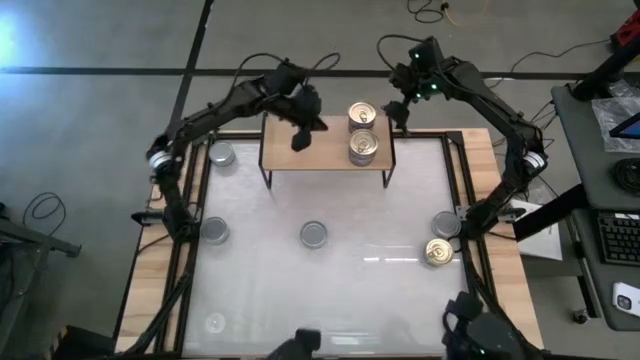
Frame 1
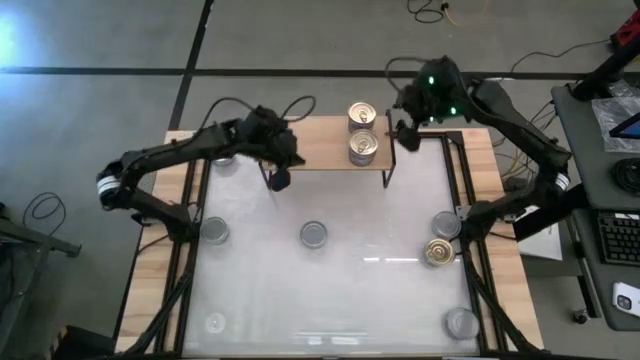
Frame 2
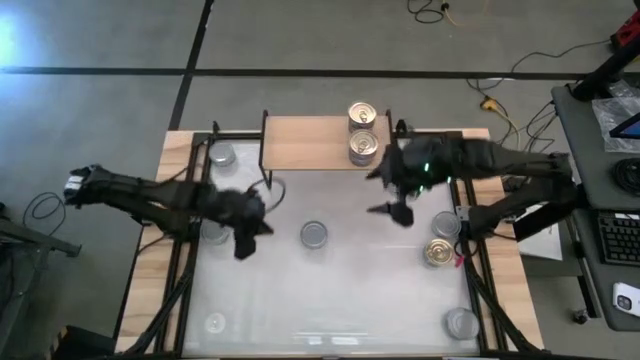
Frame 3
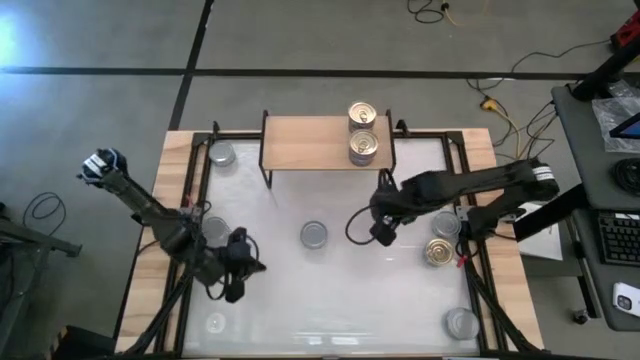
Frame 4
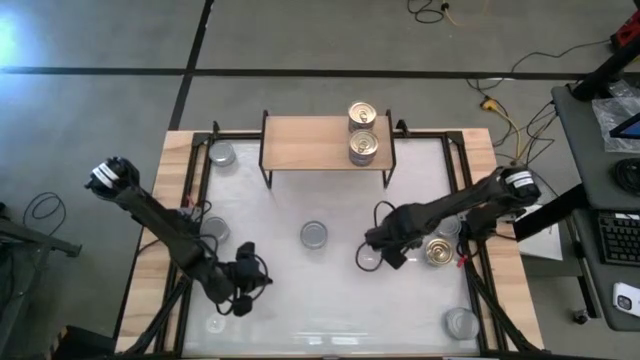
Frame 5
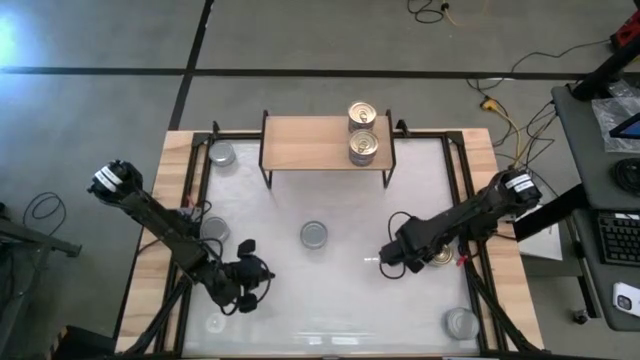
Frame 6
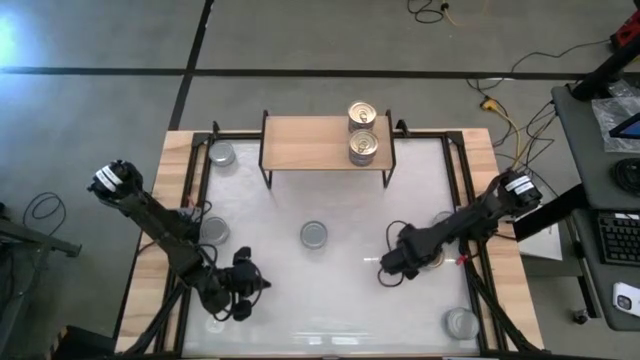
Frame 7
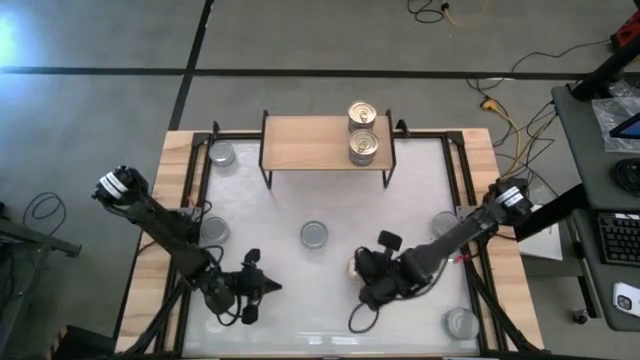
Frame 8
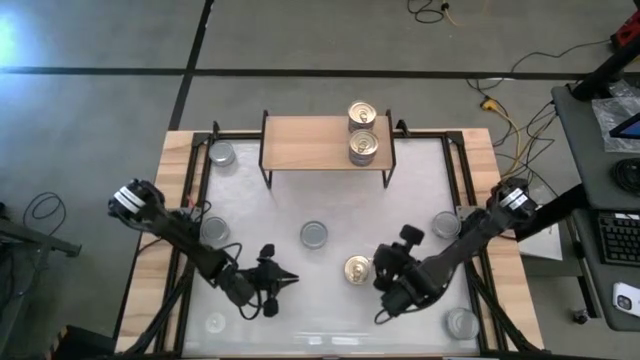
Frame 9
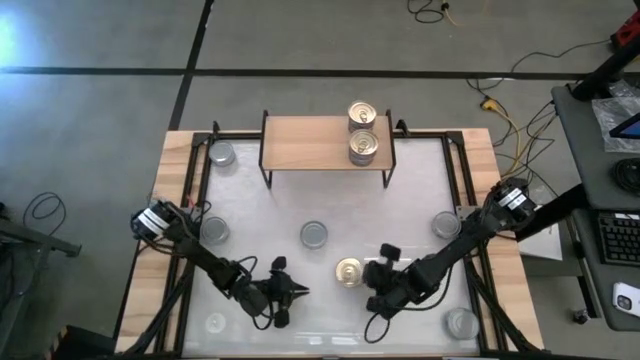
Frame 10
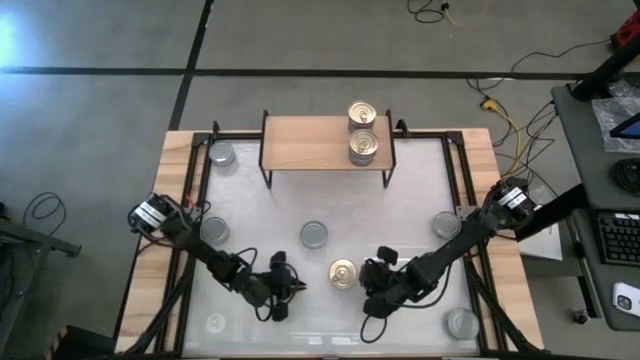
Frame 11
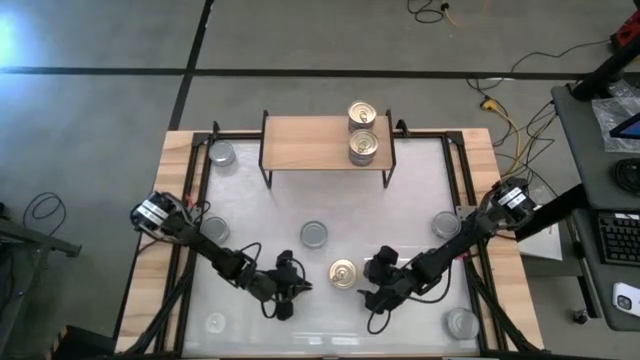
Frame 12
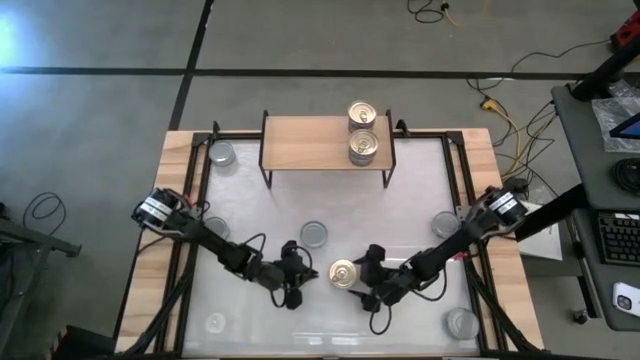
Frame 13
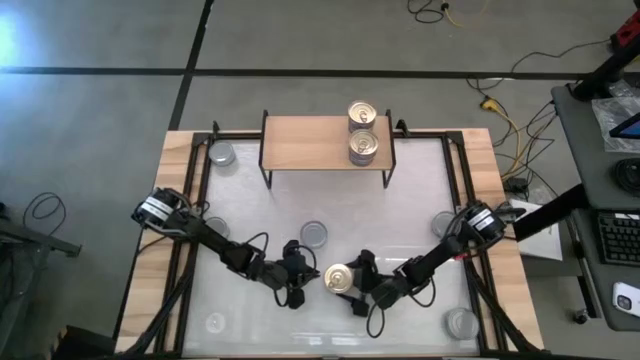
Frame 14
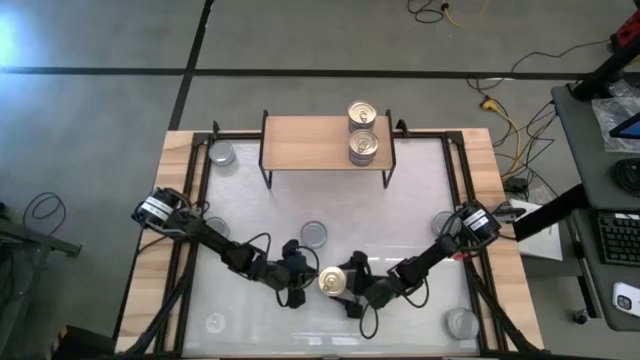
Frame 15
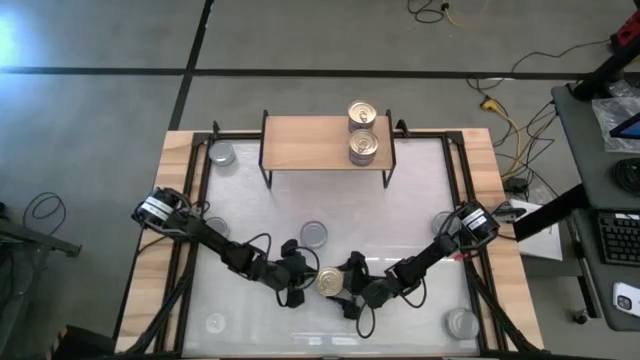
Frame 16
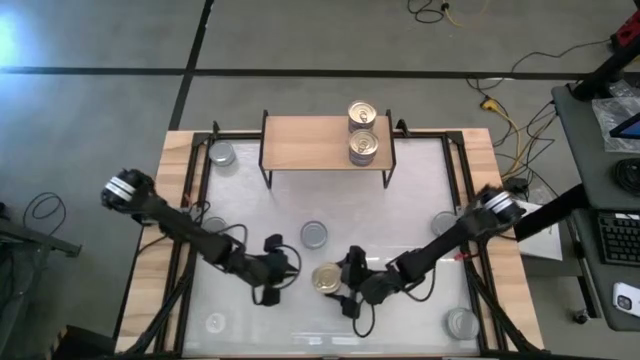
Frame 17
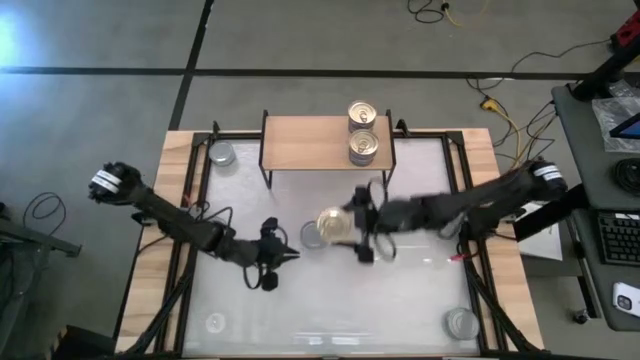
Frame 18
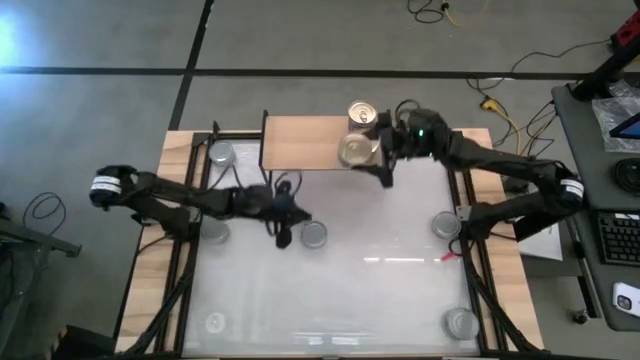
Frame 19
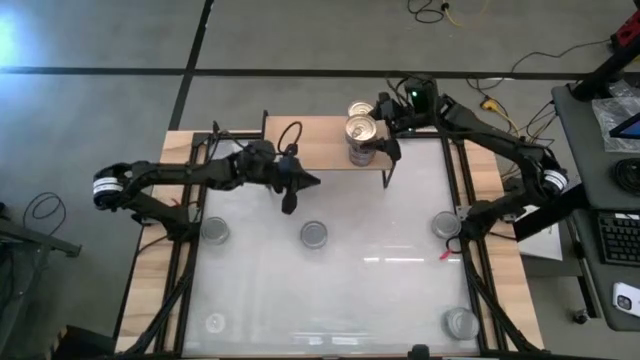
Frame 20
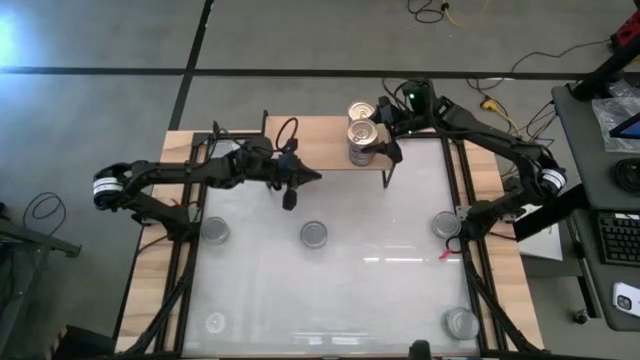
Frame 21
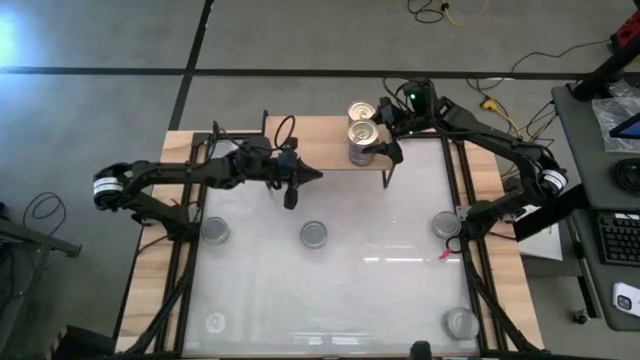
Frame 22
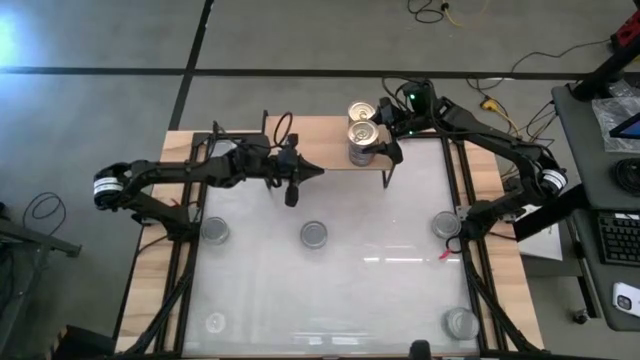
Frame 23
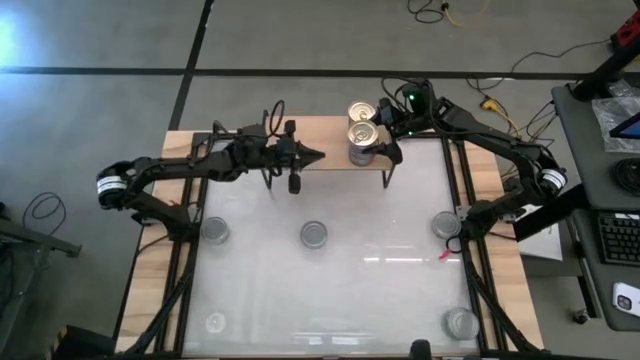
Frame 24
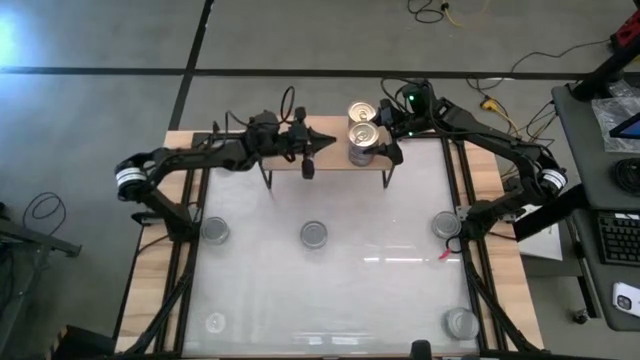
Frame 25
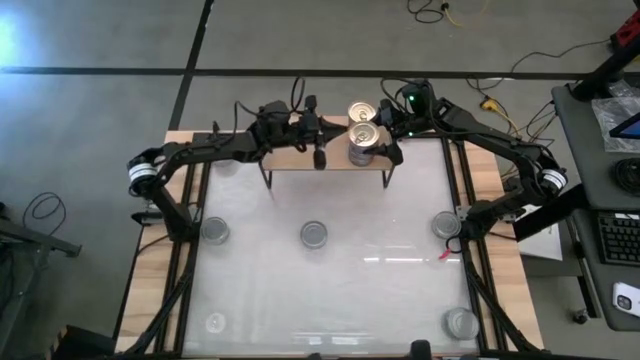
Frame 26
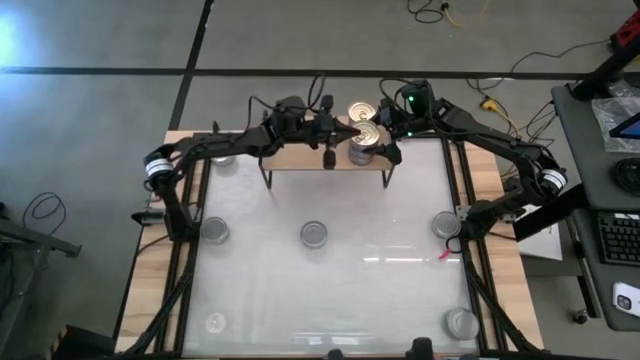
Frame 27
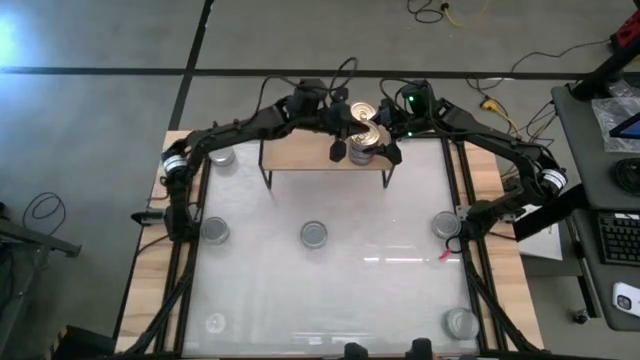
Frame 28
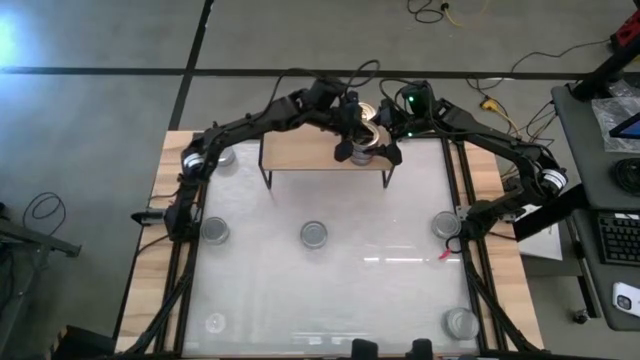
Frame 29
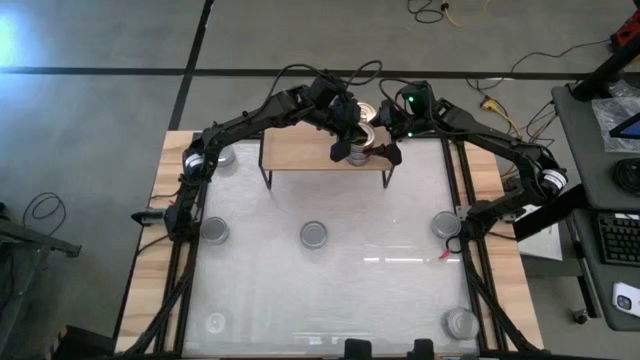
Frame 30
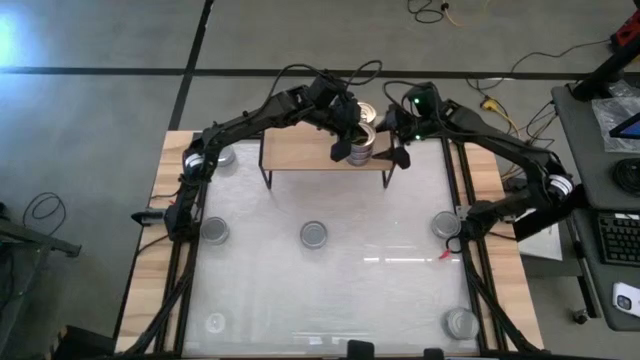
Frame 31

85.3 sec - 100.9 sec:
Task: Stack canned seafood by type on shelf
Stack the blue tuna can on top of the blue tuna can on the shelf

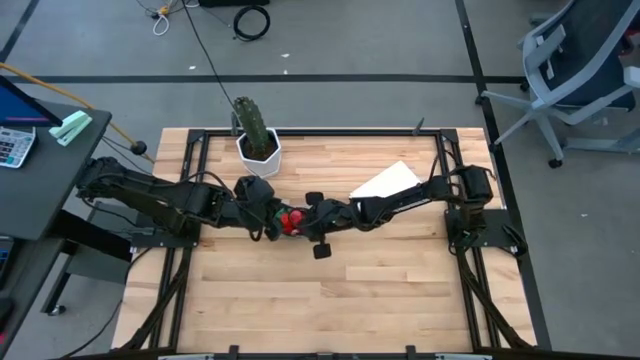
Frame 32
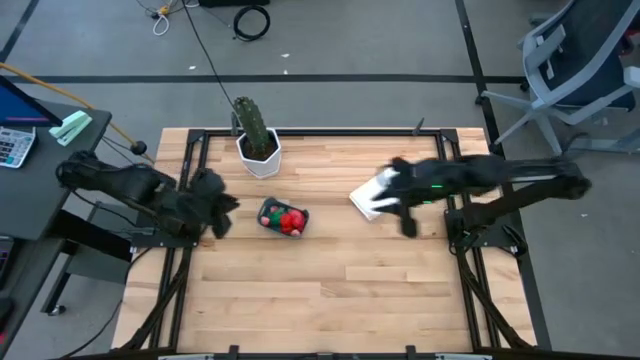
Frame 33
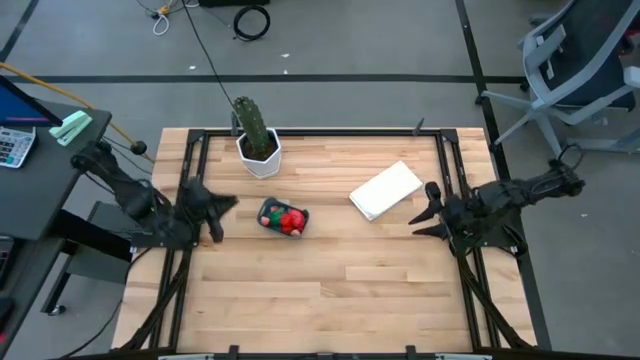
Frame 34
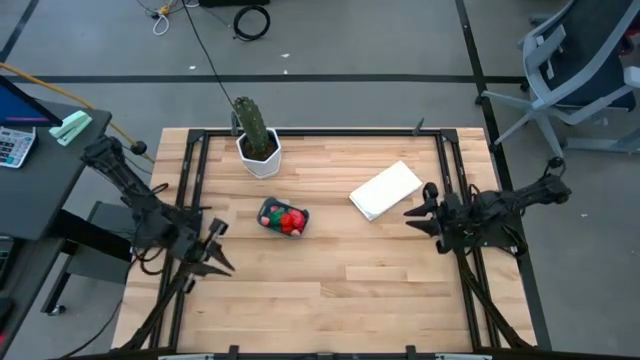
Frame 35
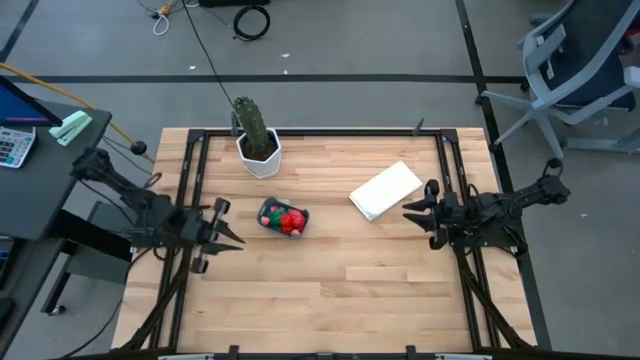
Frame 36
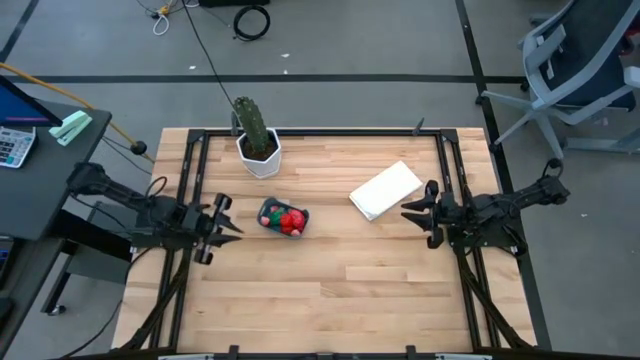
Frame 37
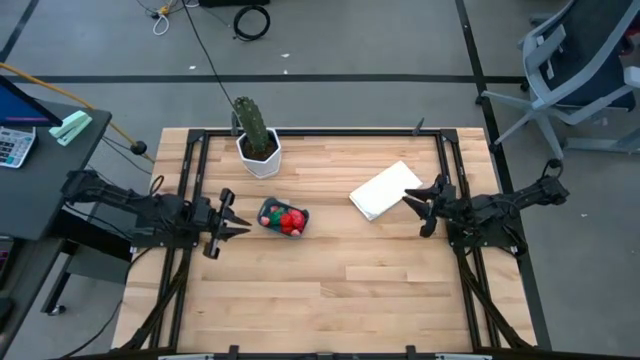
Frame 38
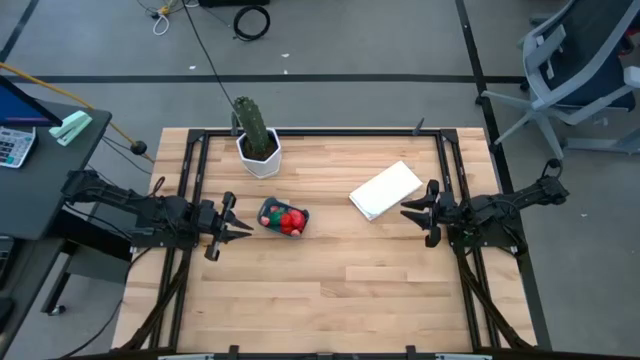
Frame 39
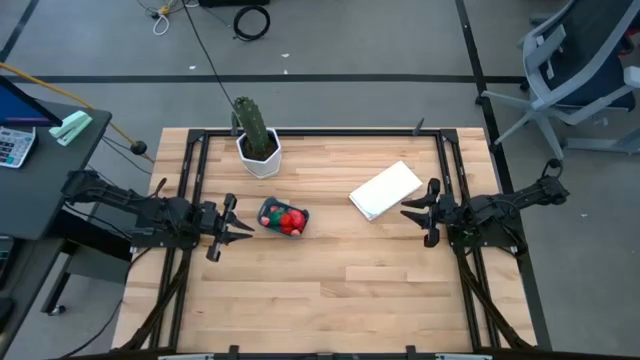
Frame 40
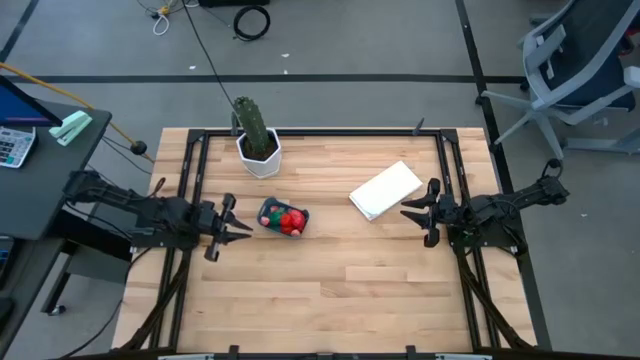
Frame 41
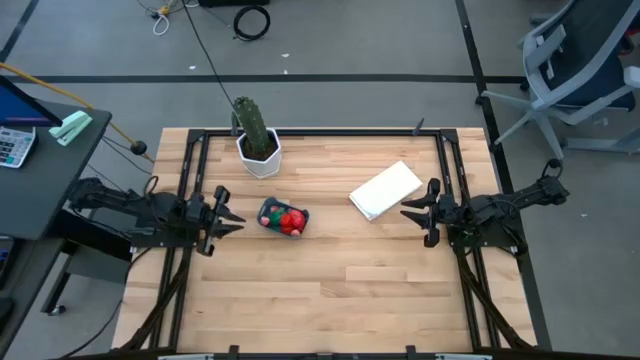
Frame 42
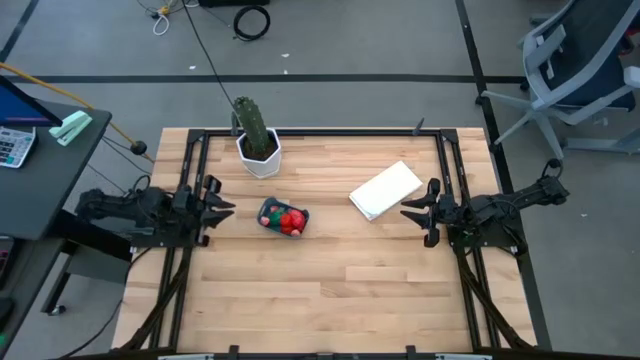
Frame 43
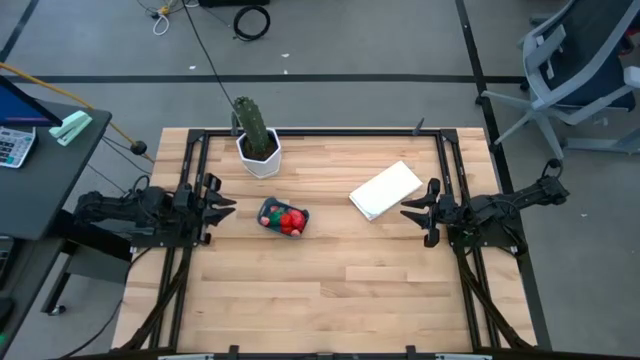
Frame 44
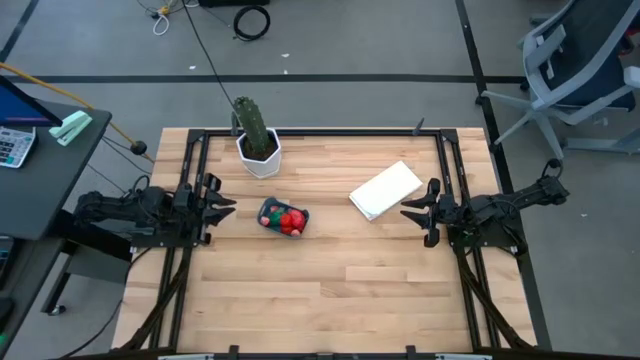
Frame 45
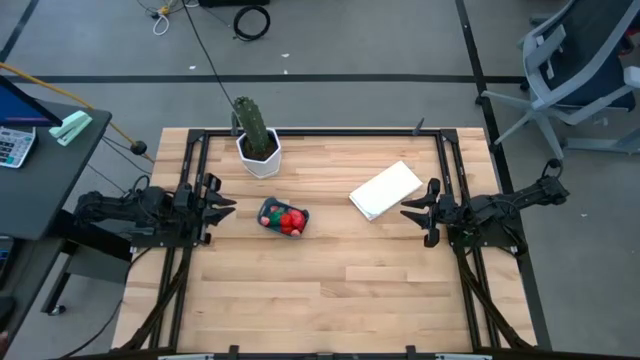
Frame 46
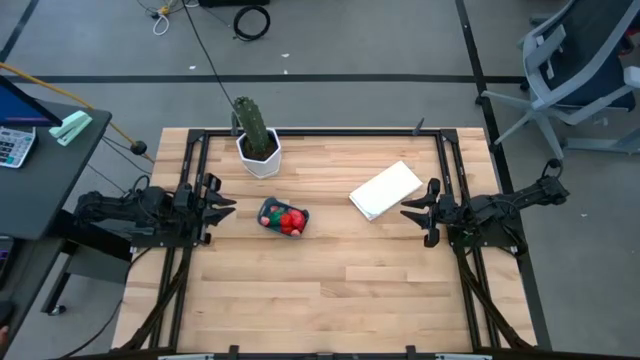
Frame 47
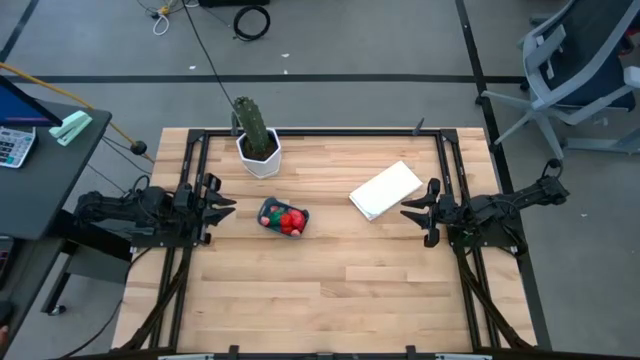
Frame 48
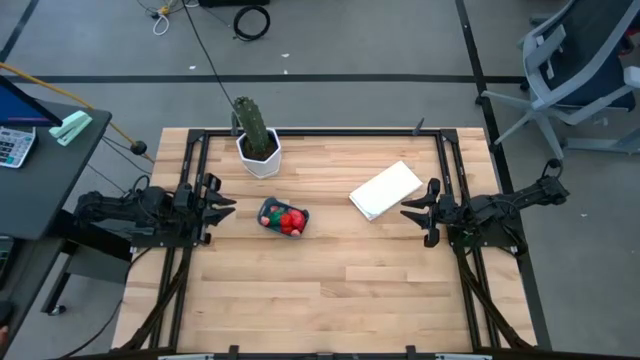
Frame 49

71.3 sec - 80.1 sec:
Task: Pick and placing Produce into tupperware
Return to Home Position
